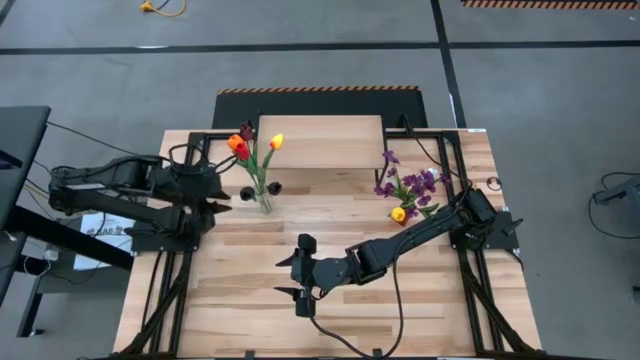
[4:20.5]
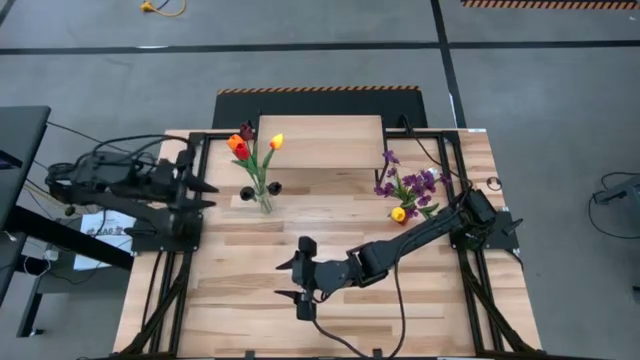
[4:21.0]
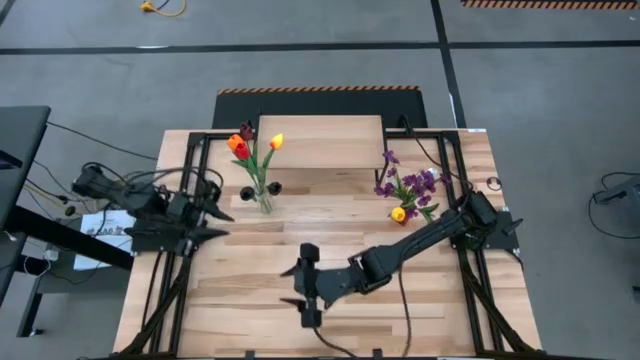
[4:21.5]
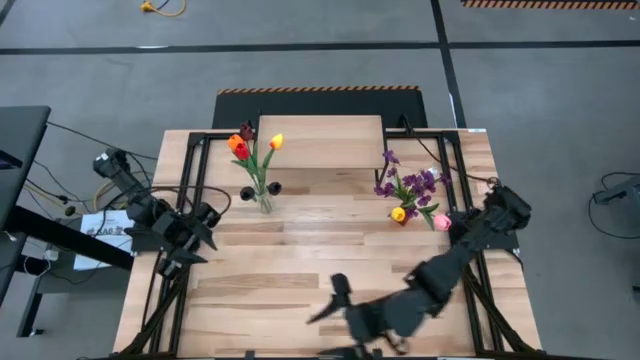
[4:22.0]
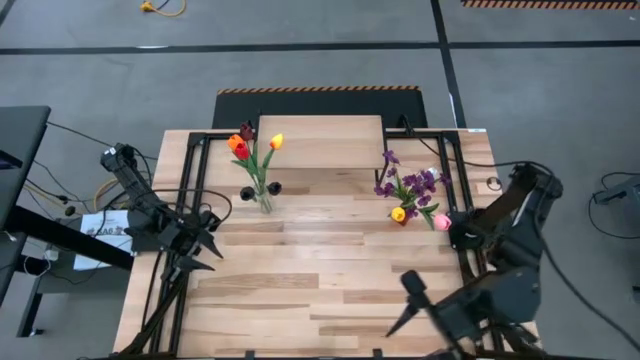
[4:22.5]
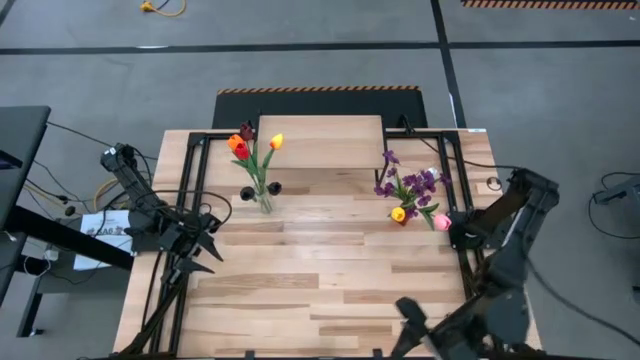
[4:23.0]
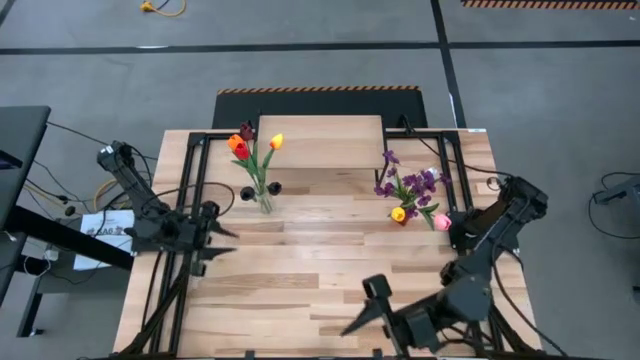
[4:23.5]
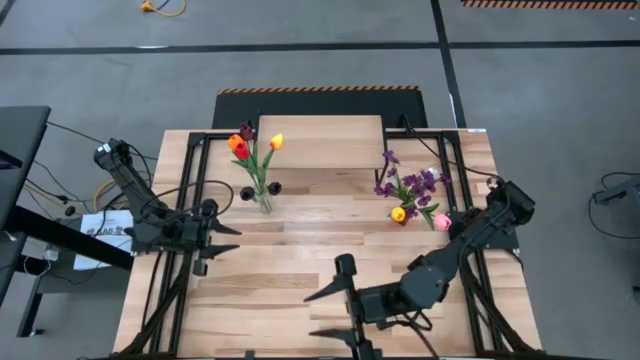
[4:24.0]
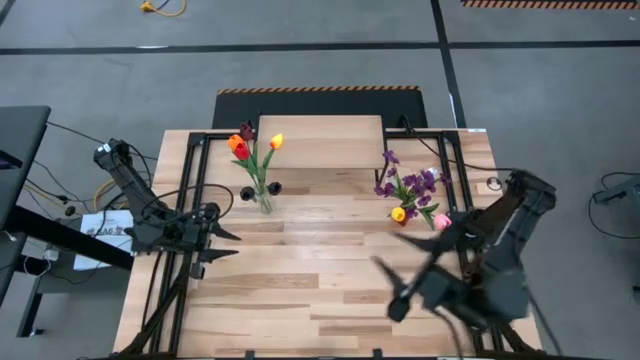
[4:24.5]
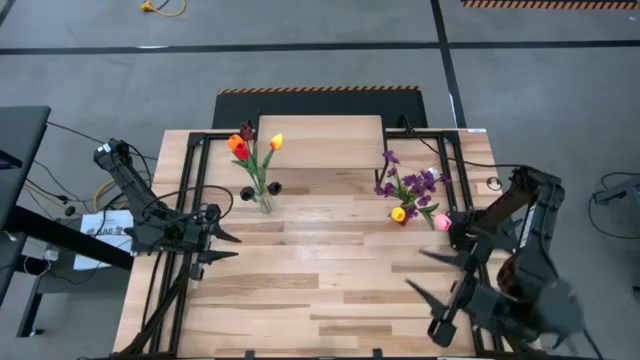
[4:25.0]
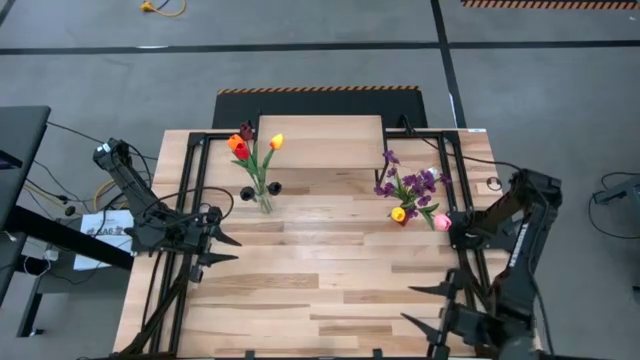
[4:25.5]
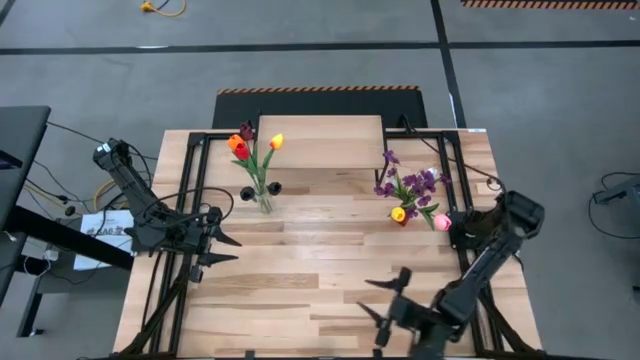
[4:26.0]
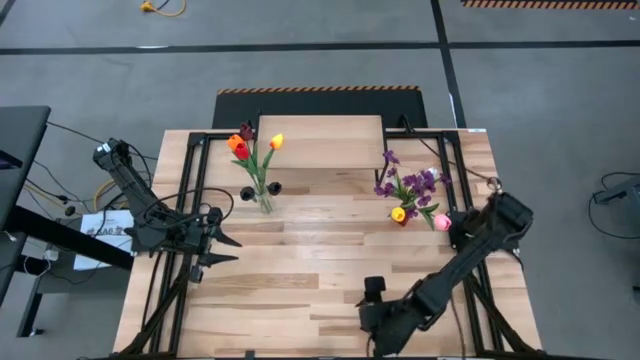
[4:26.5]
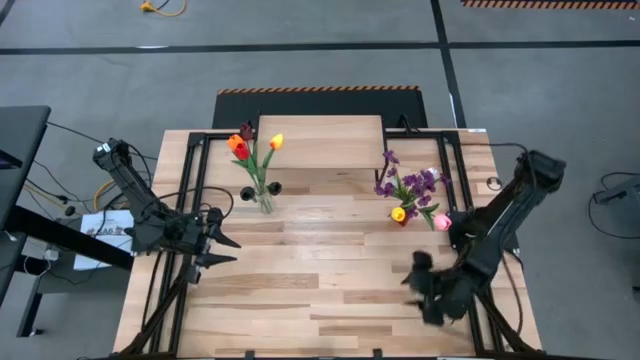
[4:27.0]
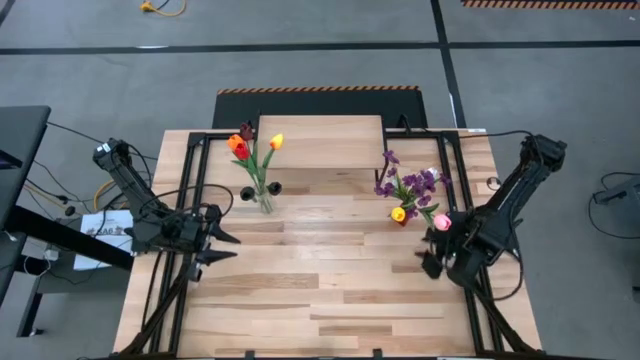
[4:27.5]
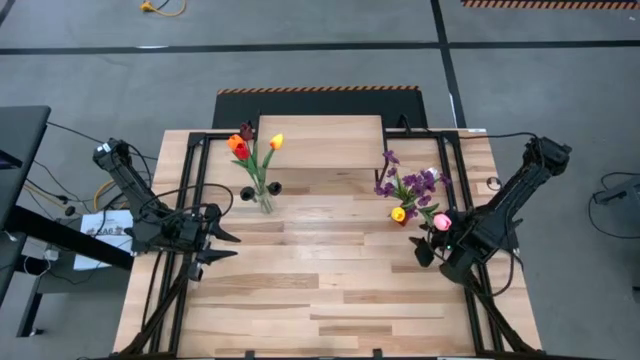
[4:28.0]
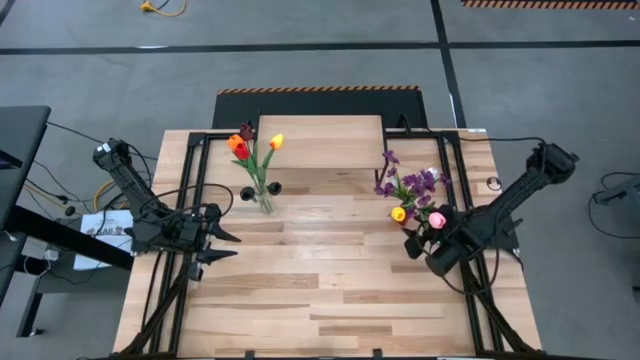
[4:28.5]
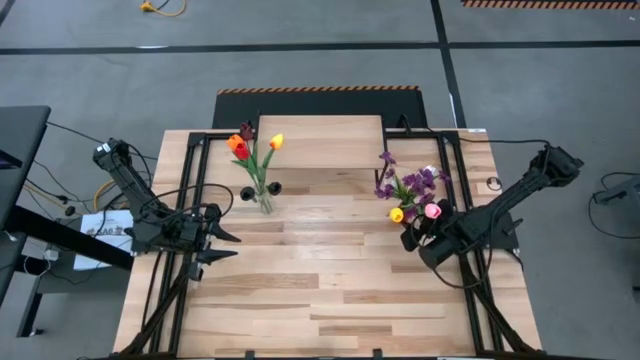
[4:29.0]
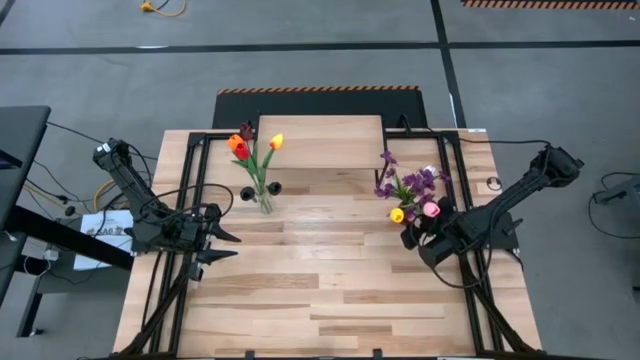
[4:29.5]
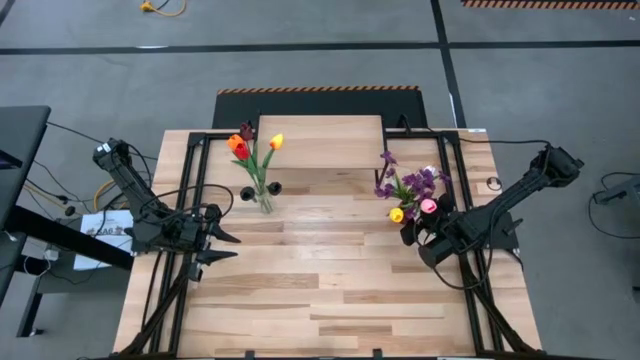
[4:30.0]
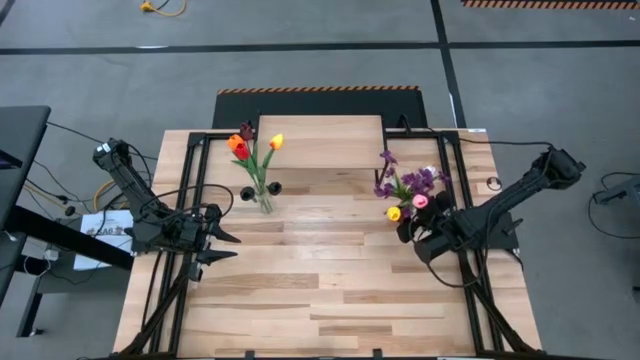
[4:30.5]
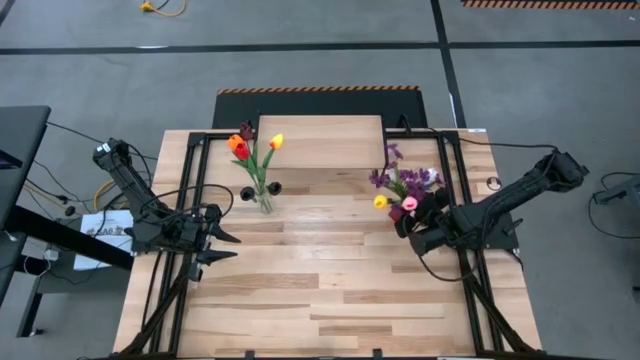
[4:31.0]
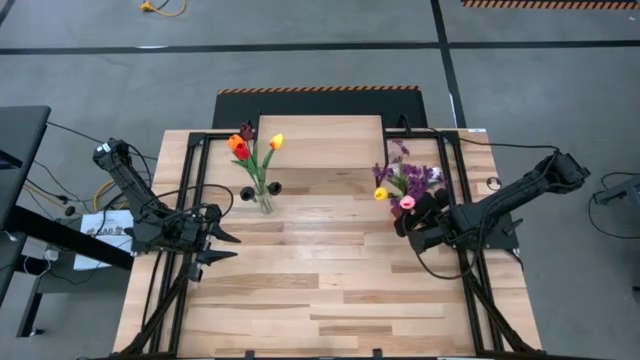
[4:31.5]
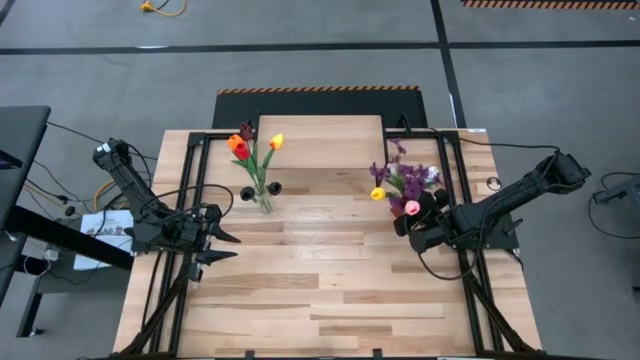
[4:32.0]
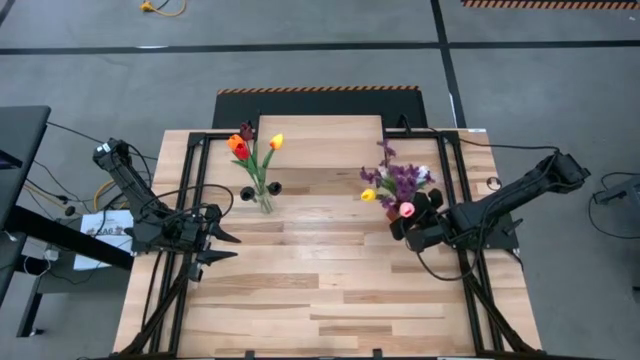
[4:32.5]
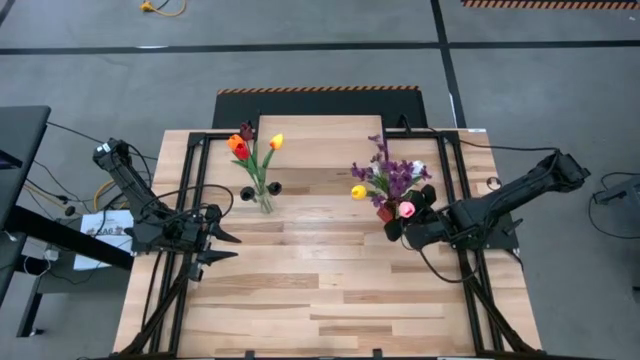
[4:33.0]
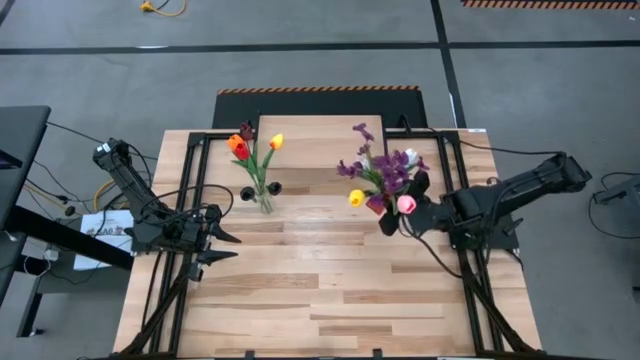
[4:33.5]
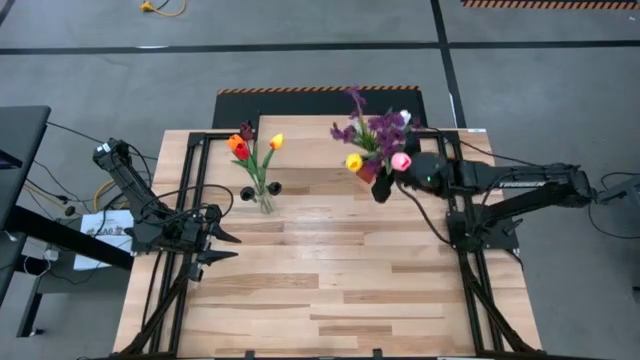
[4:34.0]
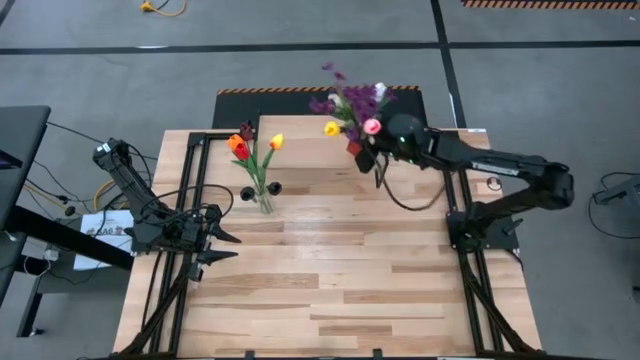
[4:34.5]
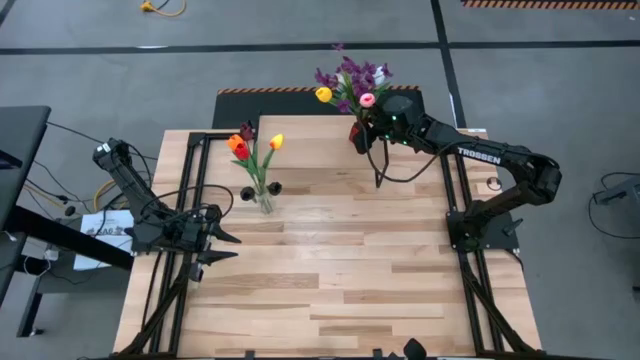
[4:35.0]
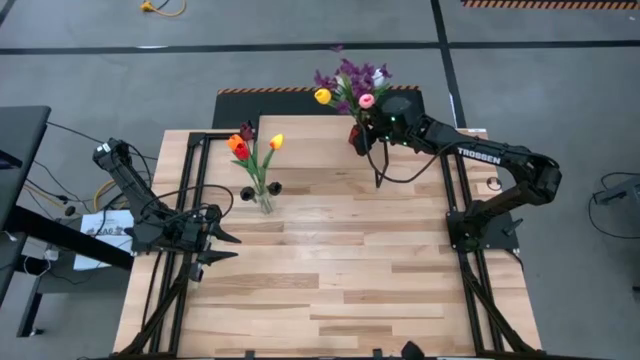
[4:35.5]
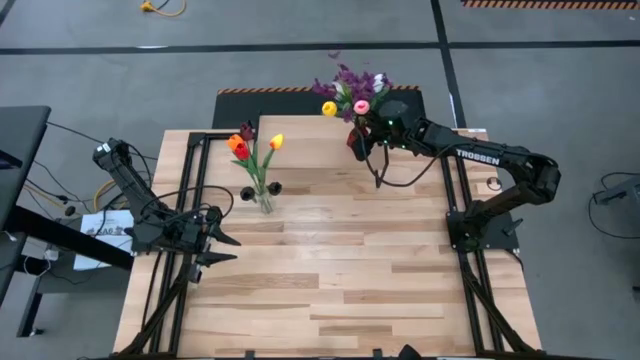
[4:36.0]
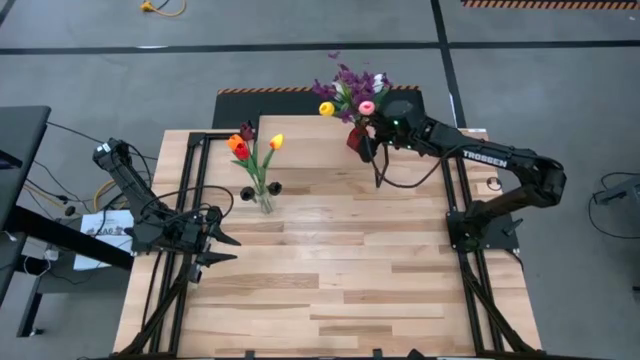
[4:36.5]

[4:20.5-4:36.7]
Task: Pick and place flowers into a vace then onto a shelf
Put the red vase with flower on the shelf

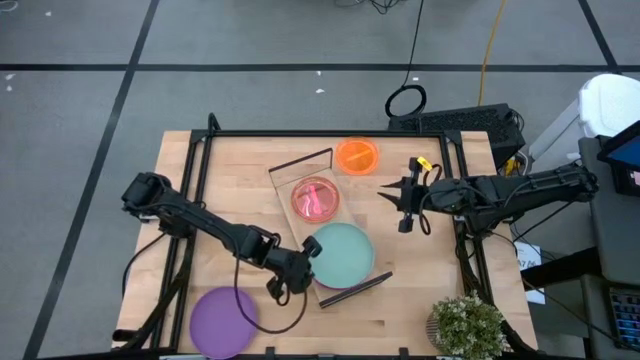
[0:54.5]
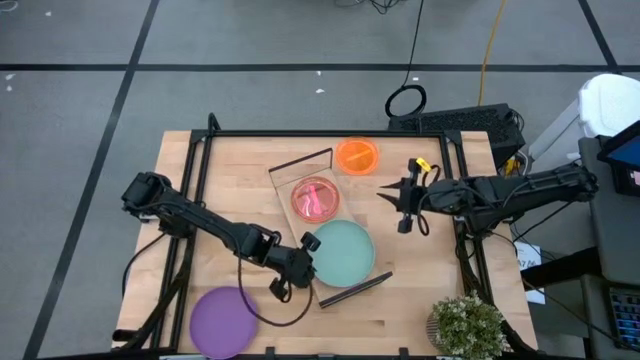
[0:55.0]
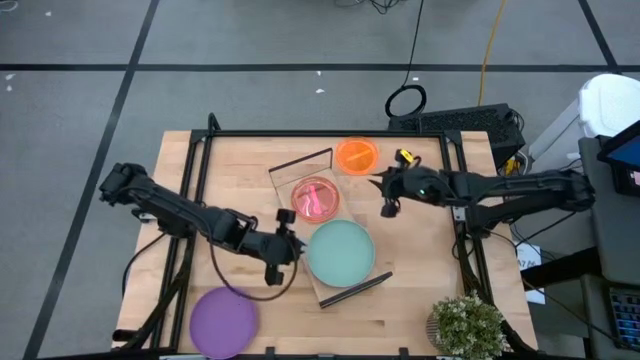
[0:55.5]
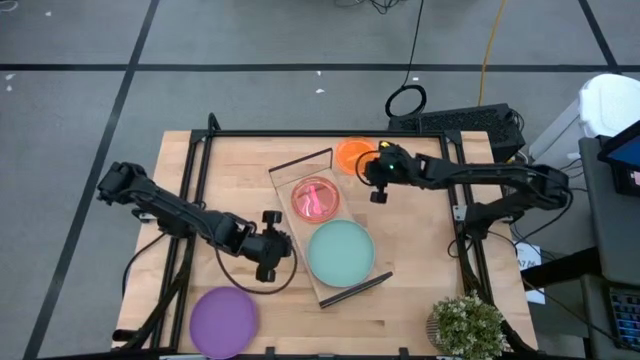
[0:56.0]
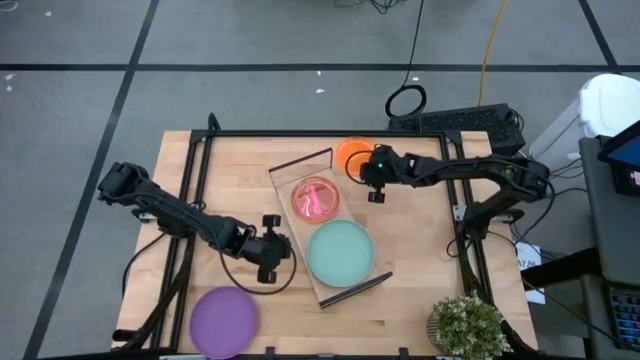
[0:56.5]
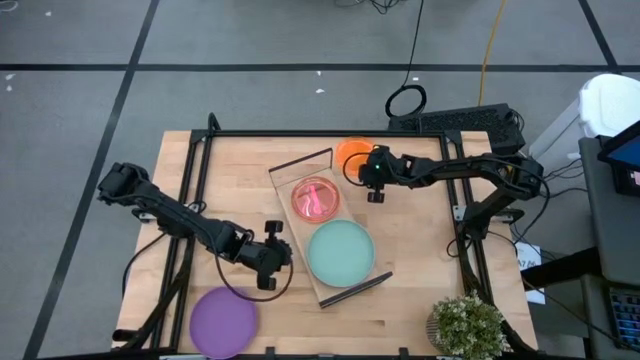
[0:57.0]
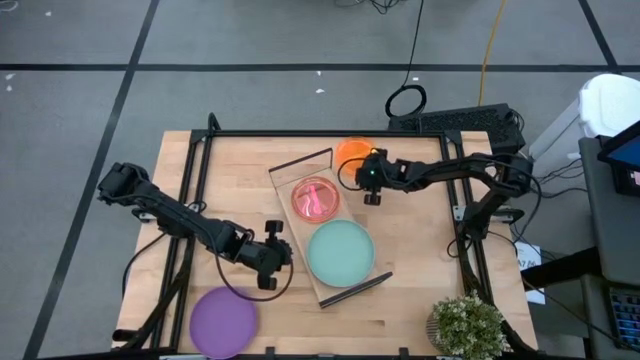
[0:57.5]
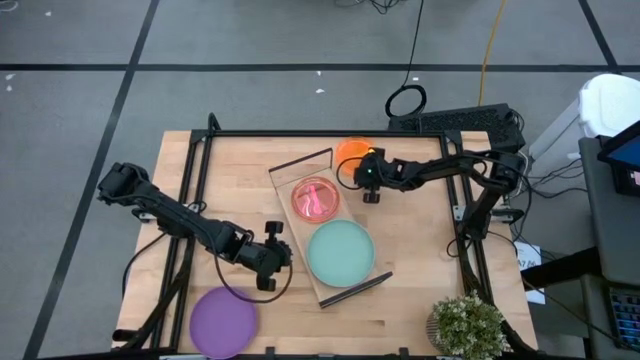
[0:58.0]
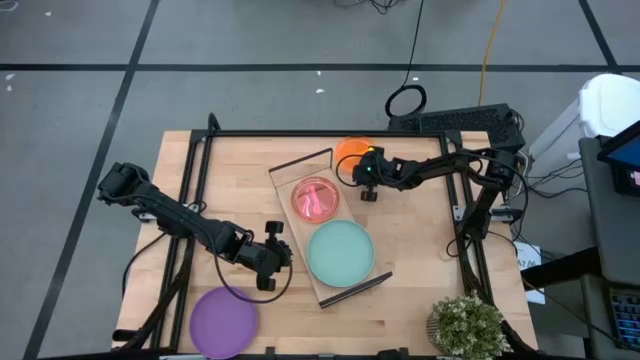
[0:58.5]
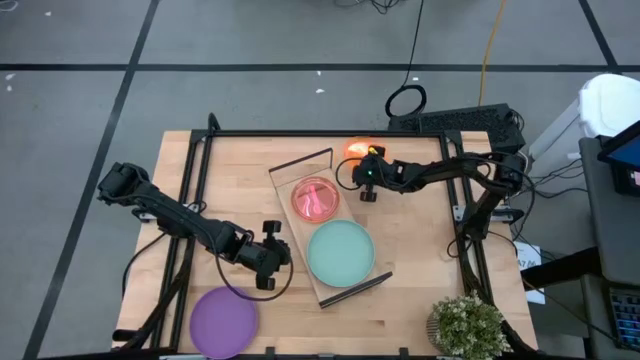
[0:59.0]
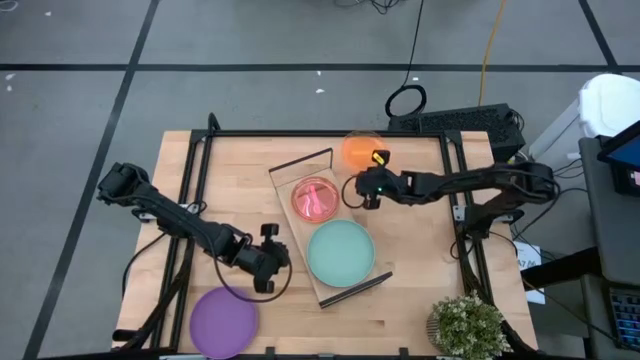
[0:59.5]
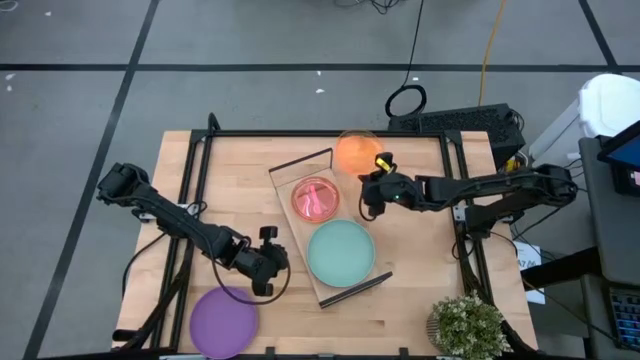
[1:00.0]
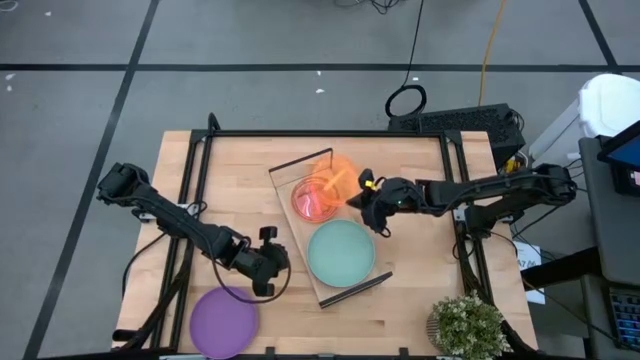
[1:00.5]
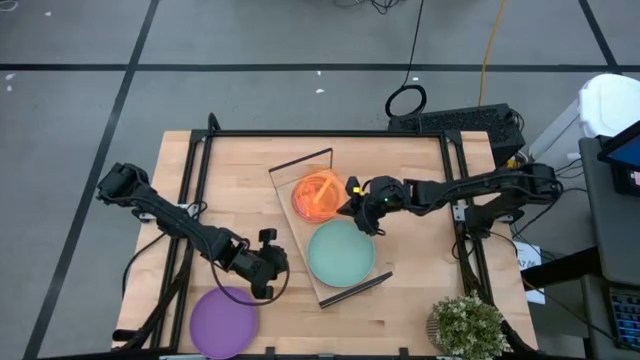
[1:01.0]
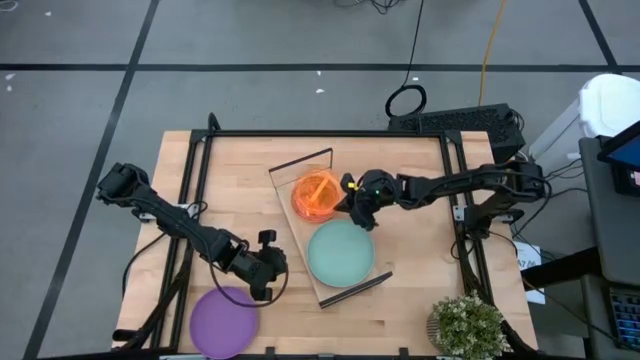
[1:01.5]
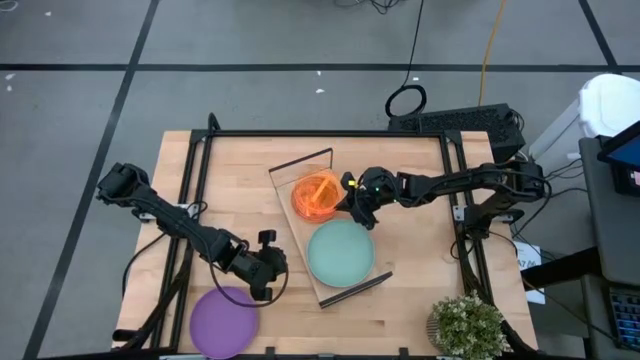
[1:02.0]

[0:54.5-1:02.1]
Task: Place and stack plates onto a shelf
Stack the light orange plate on the light pink plate on the shelf
